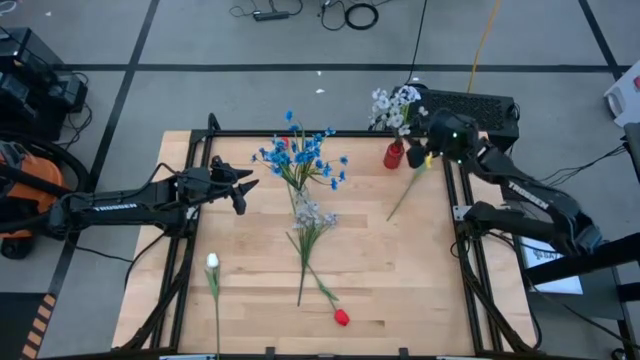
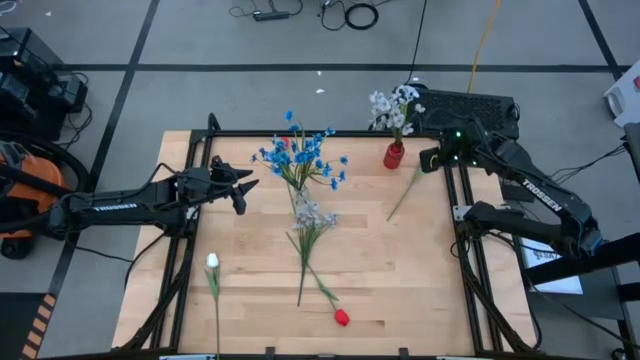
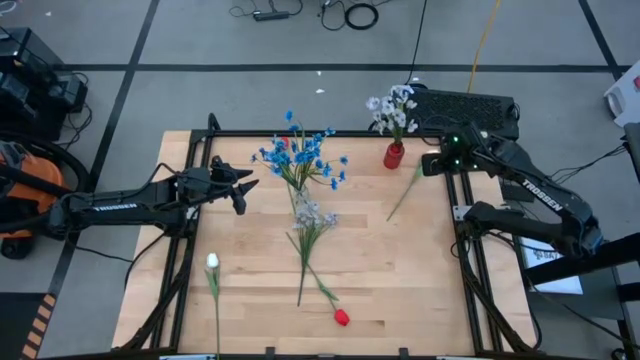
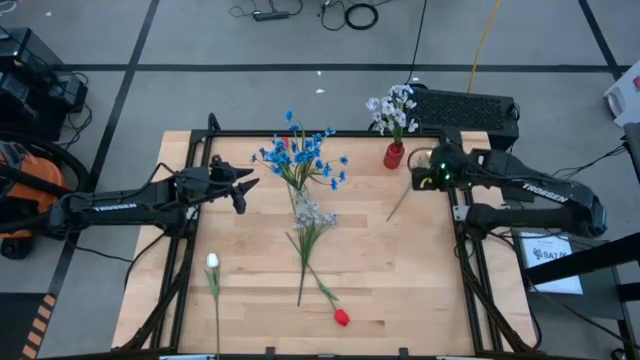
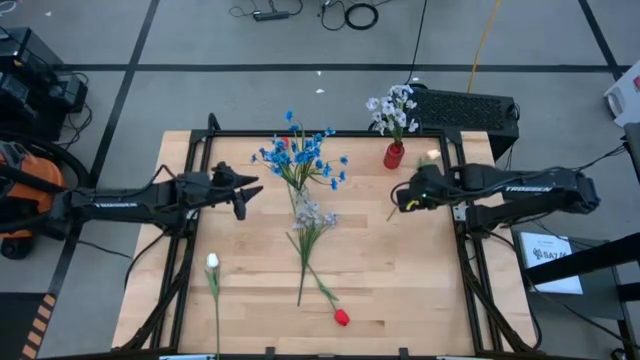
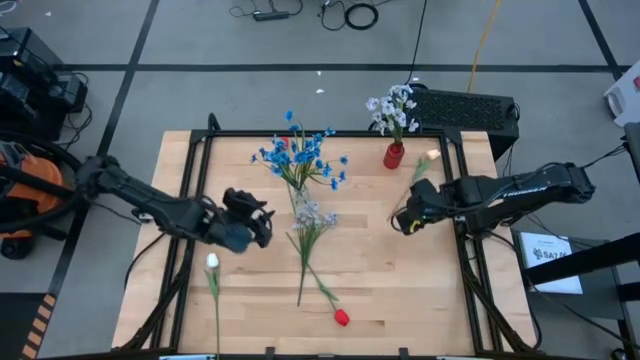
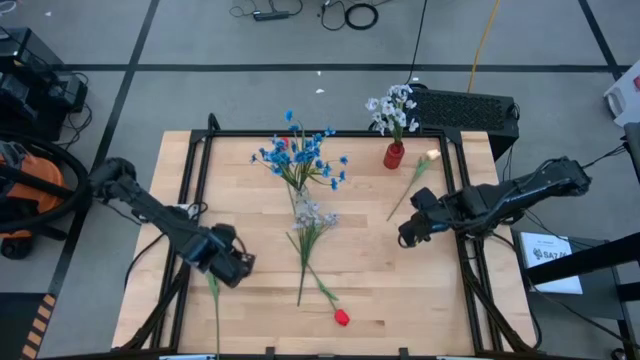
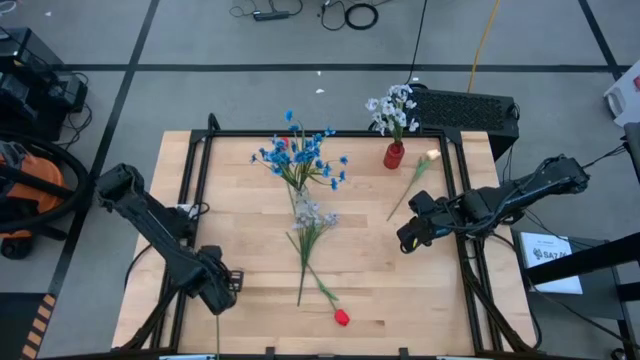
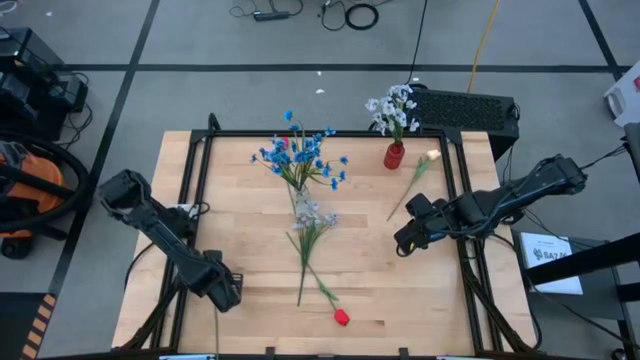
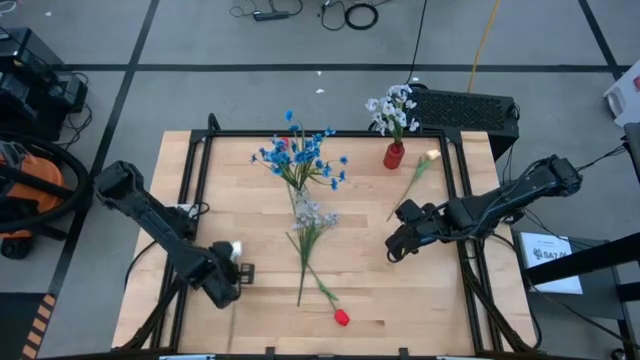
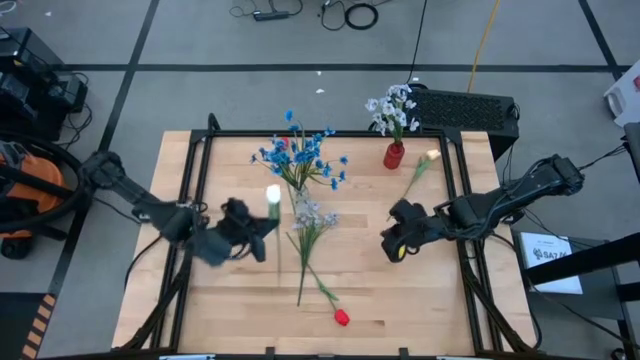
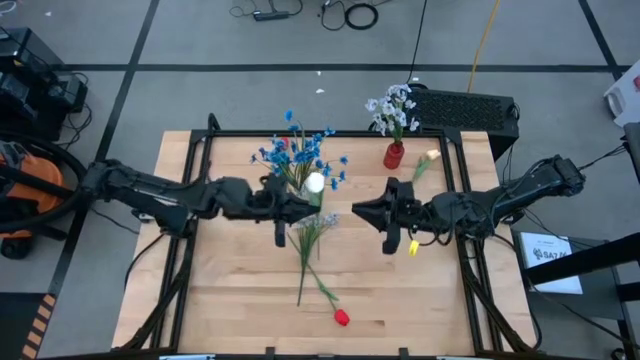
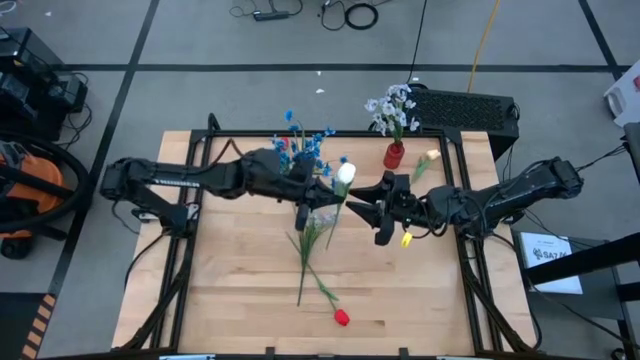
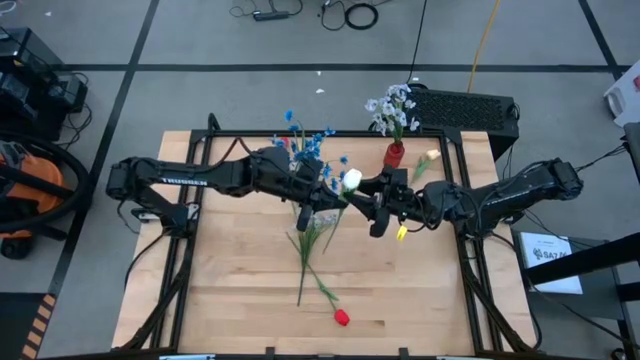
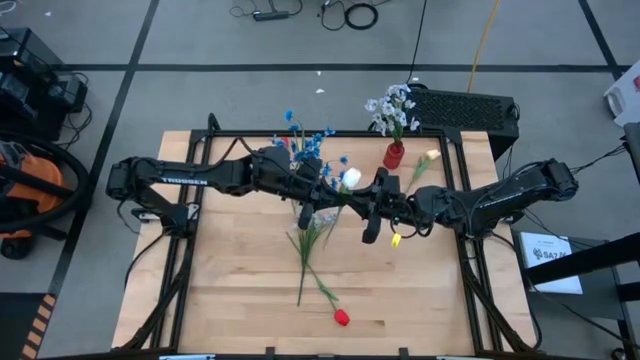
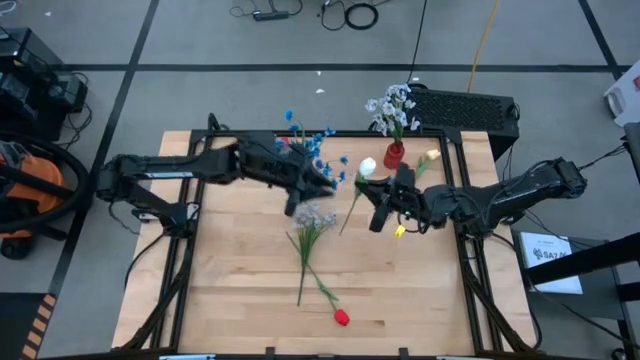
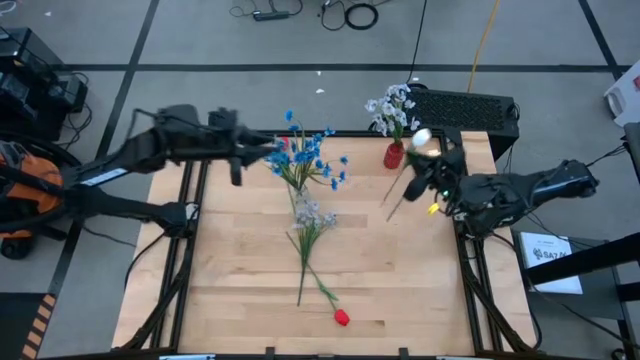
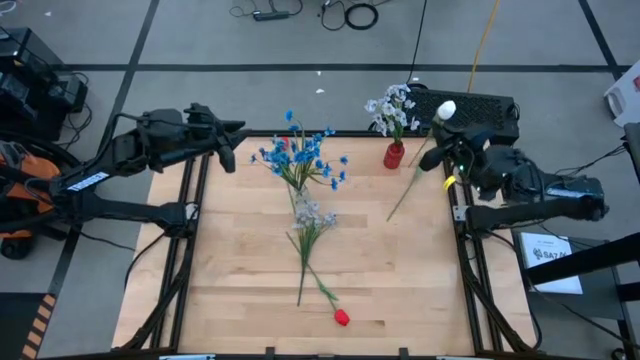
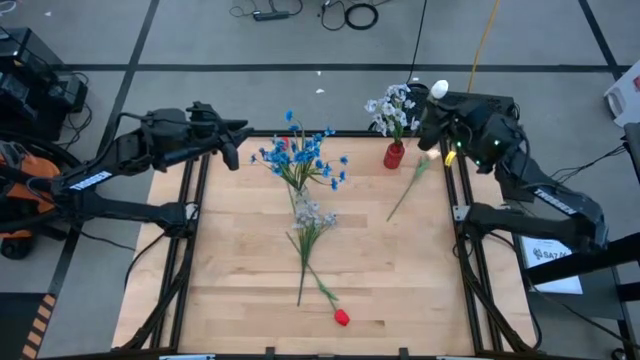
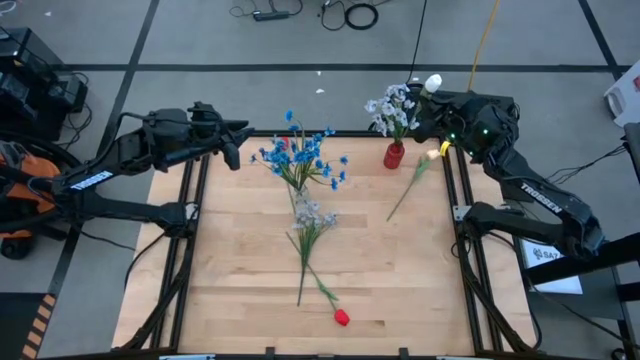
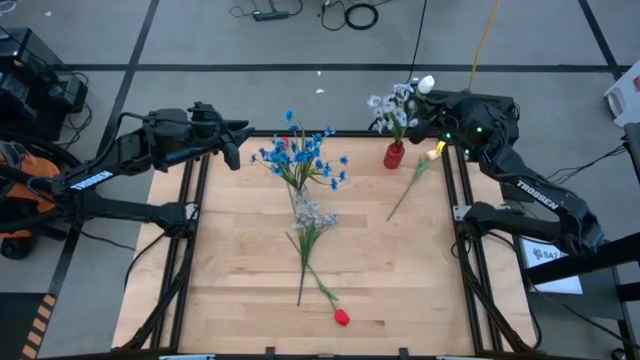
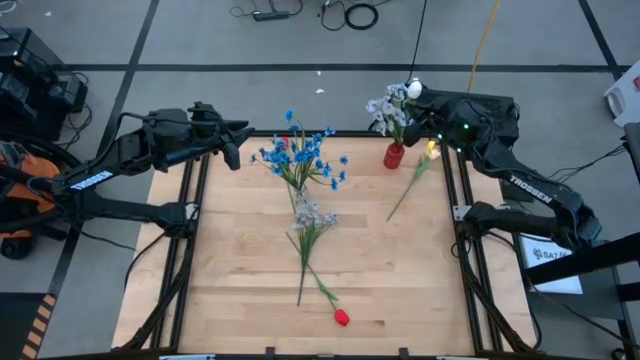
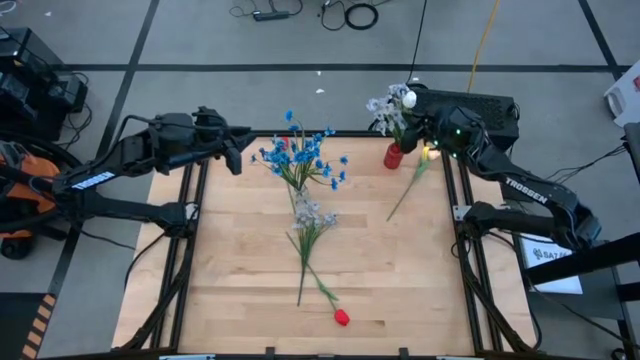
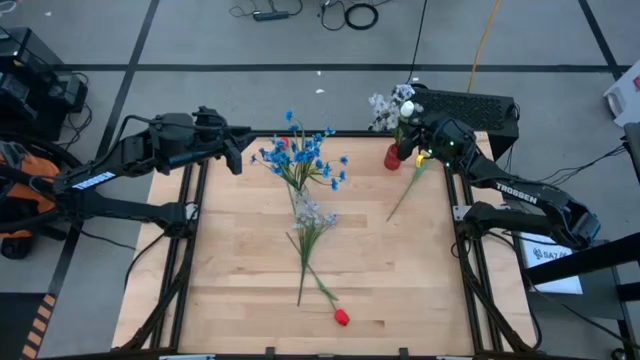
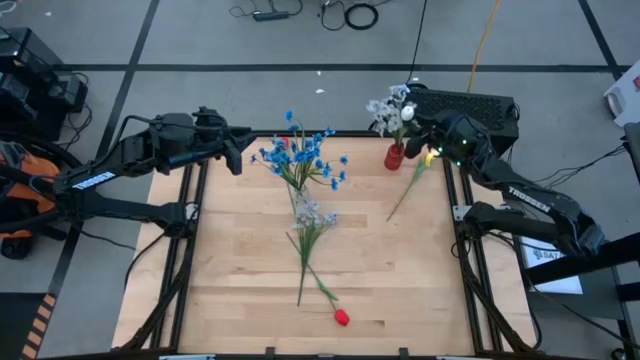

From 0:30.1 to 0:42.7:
Task: Sort flowers into vase by color
Put the white flower into the red vase

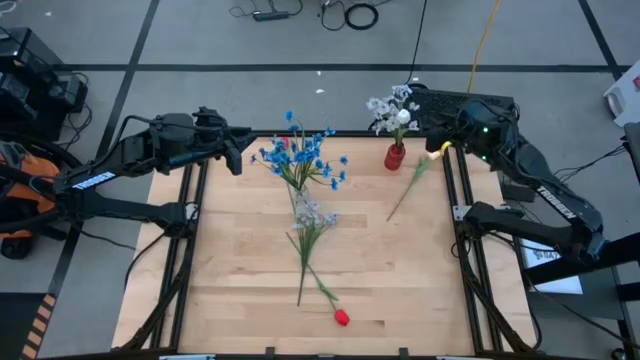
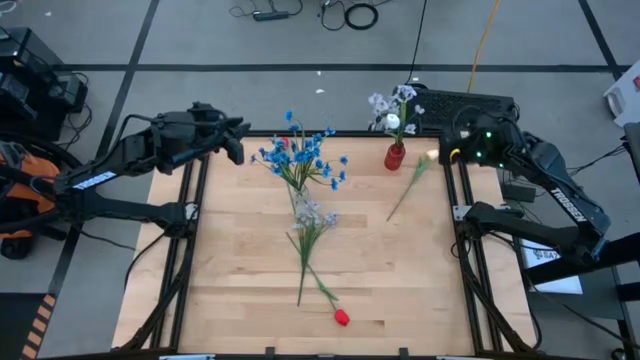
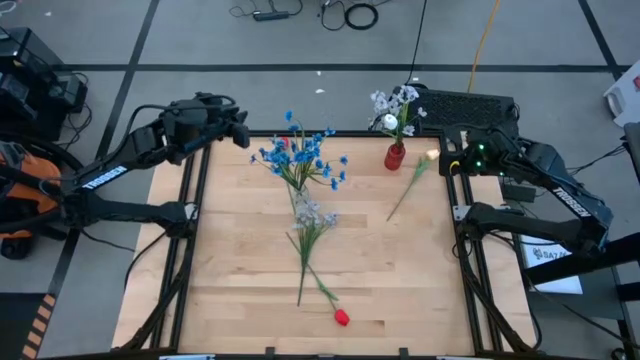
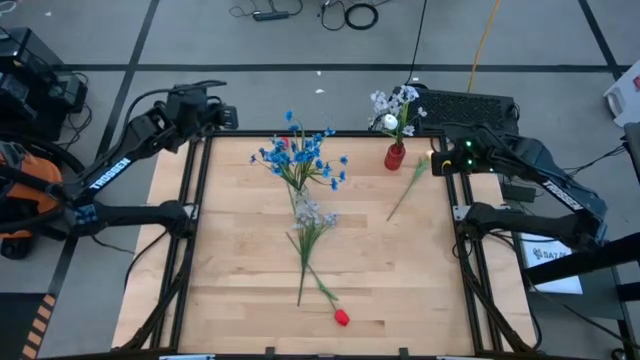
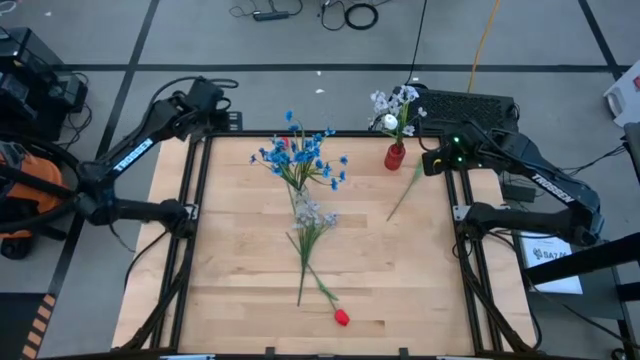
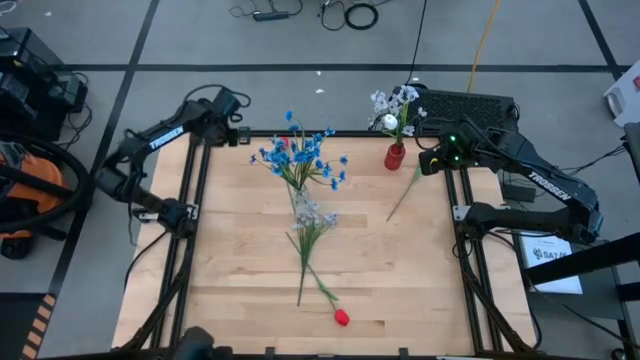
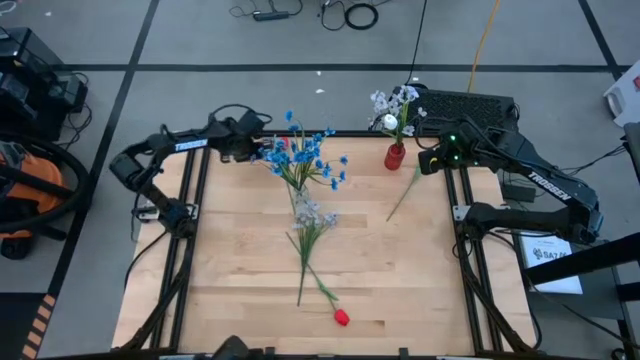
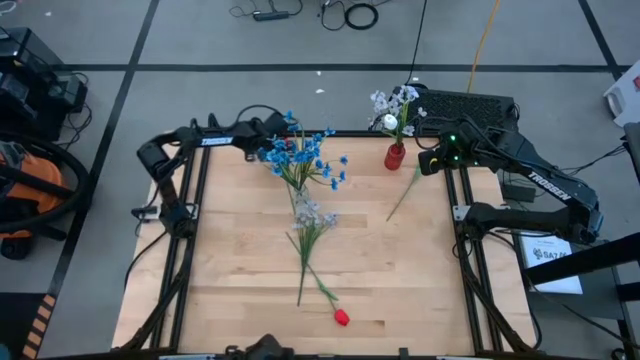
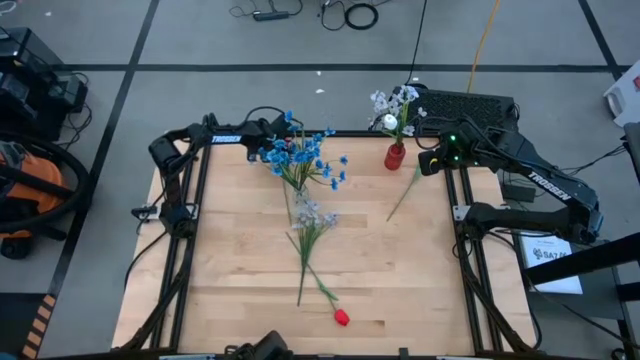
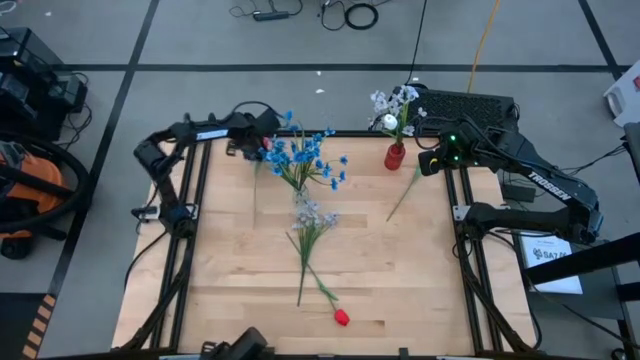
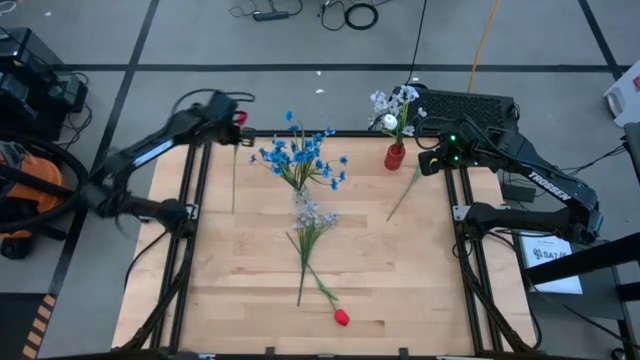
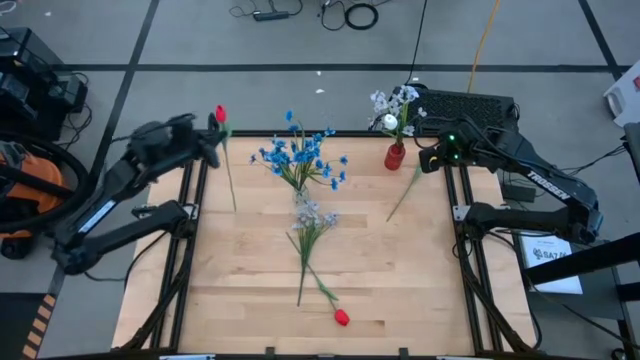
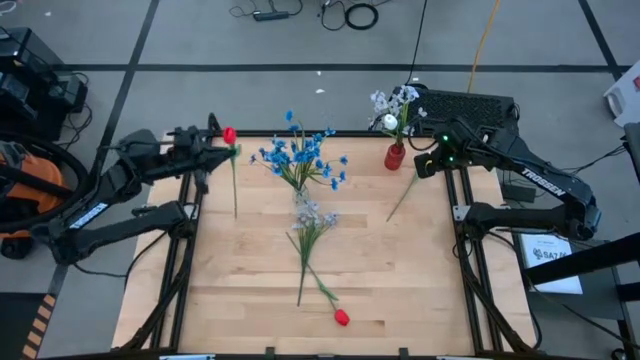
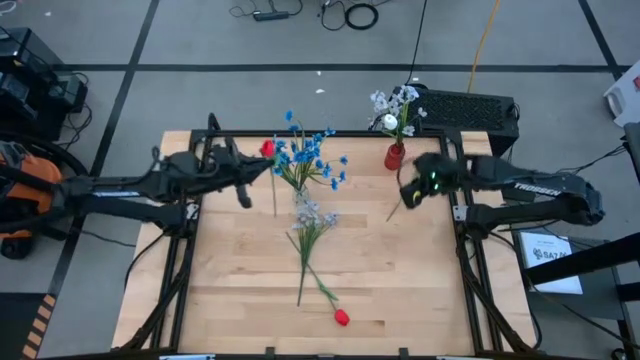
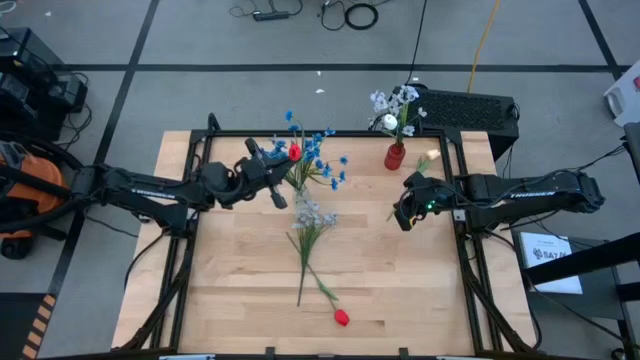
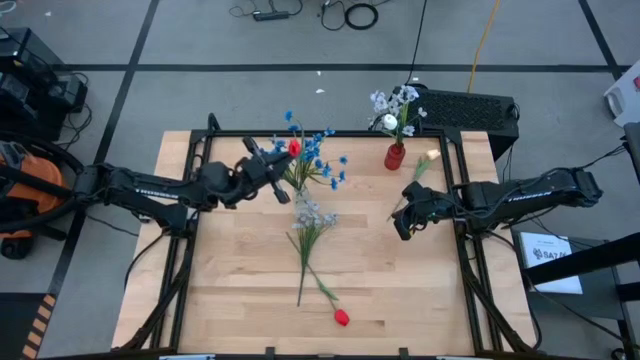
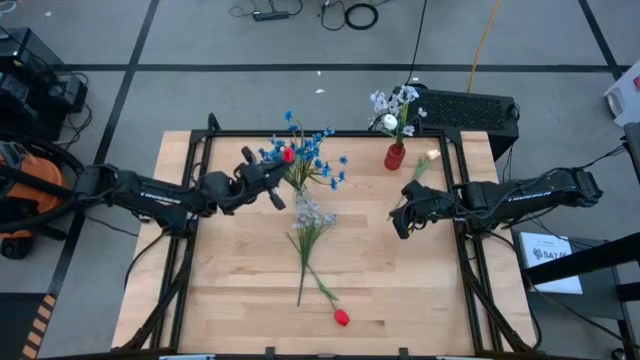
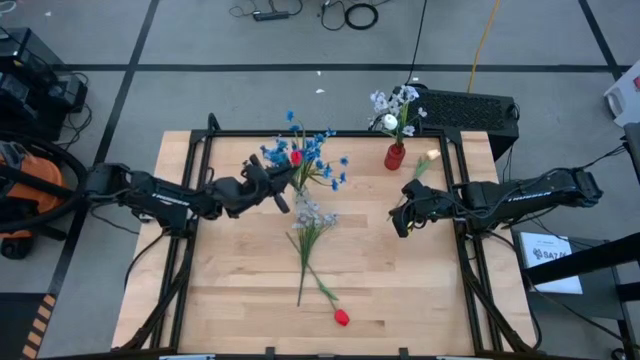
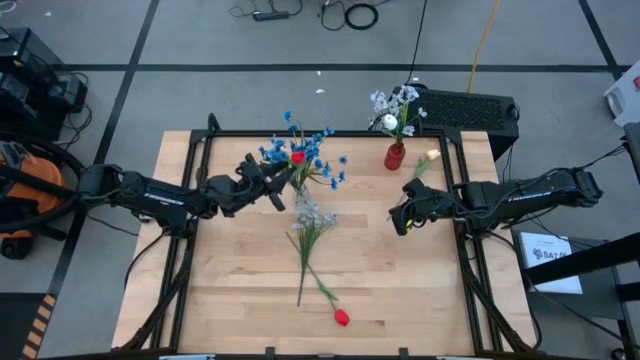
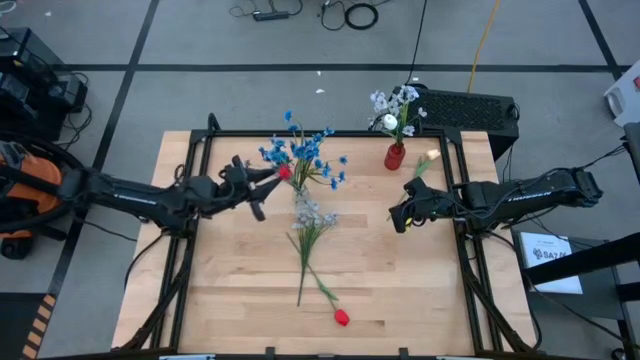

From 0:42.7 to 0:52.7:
Put the top red flower into the red vase
